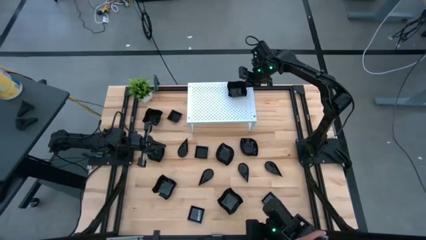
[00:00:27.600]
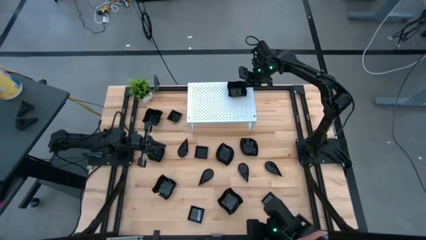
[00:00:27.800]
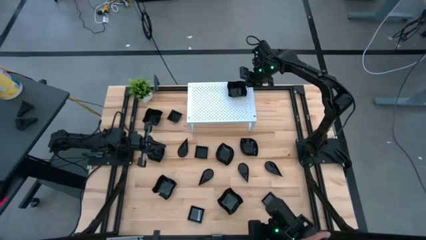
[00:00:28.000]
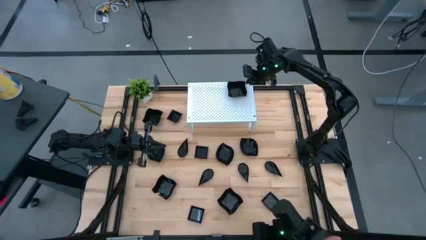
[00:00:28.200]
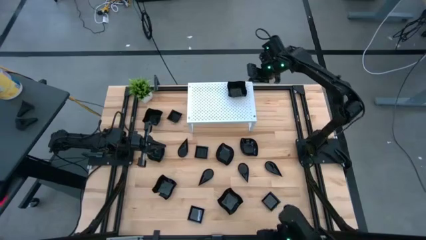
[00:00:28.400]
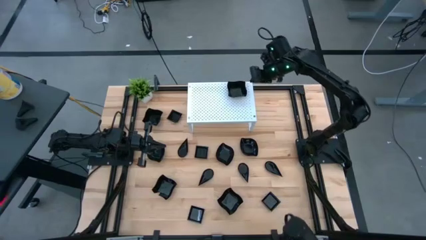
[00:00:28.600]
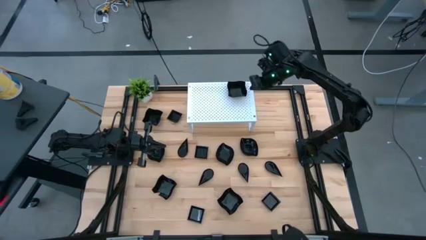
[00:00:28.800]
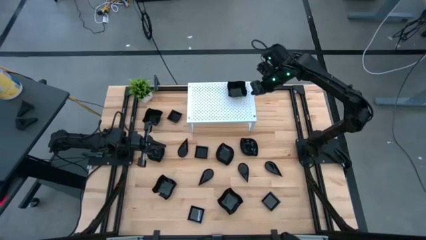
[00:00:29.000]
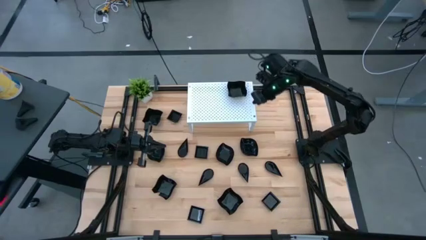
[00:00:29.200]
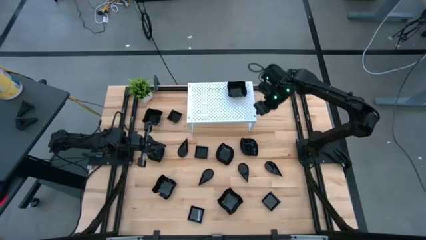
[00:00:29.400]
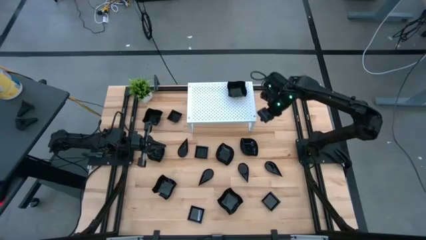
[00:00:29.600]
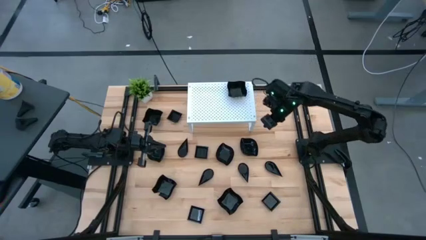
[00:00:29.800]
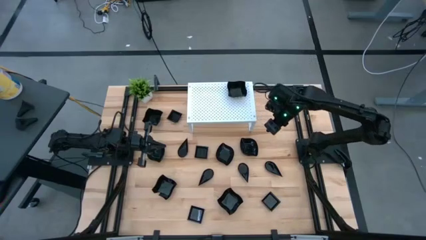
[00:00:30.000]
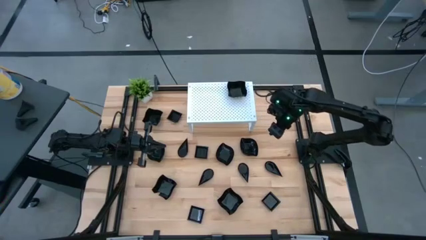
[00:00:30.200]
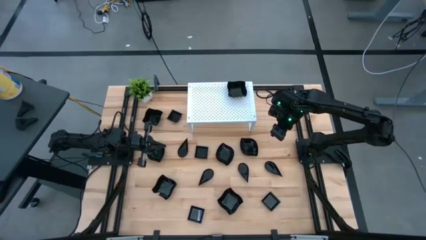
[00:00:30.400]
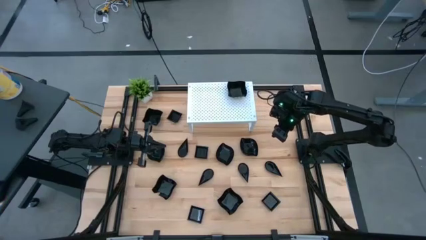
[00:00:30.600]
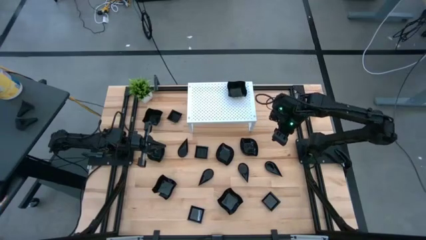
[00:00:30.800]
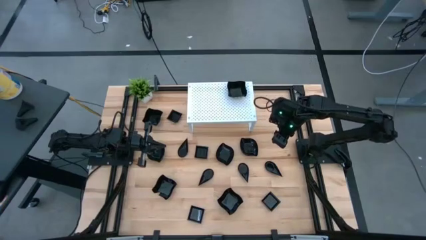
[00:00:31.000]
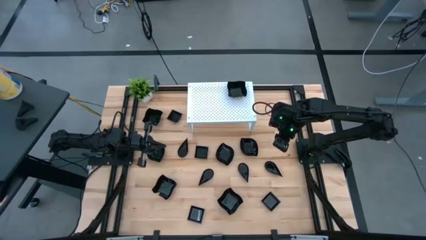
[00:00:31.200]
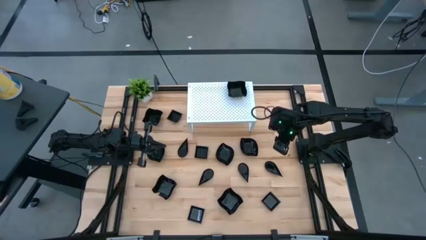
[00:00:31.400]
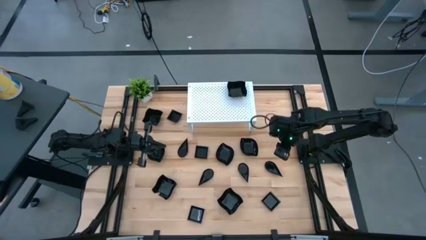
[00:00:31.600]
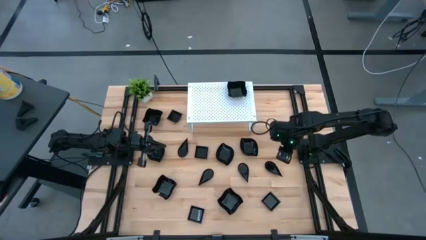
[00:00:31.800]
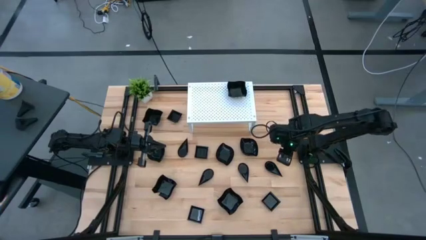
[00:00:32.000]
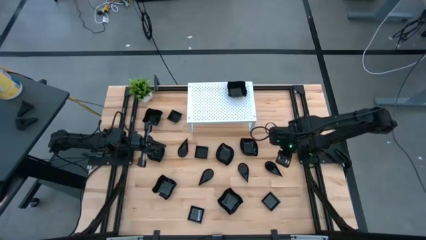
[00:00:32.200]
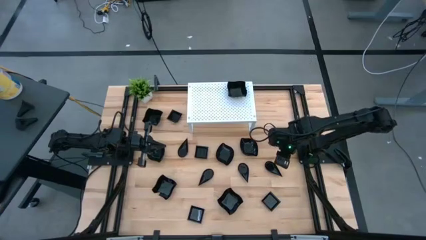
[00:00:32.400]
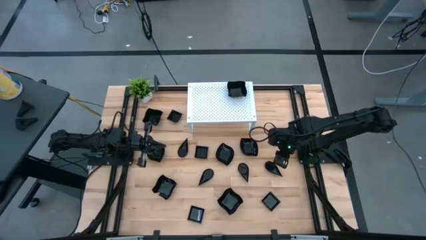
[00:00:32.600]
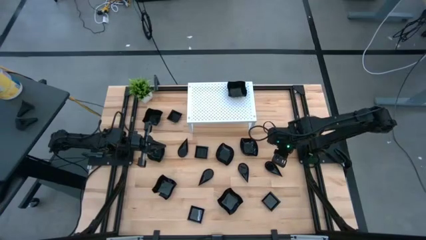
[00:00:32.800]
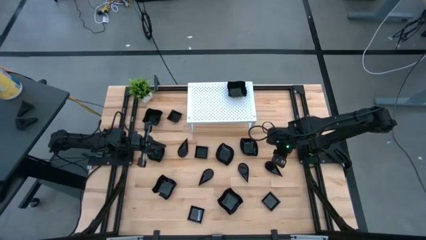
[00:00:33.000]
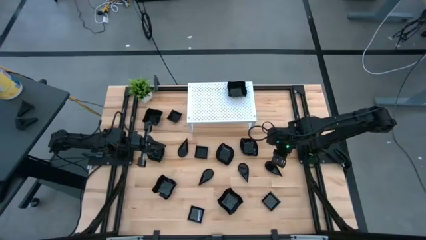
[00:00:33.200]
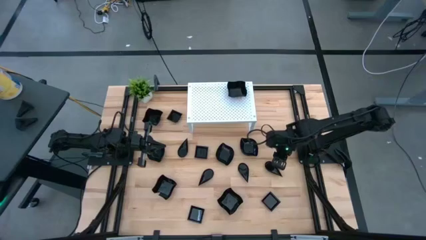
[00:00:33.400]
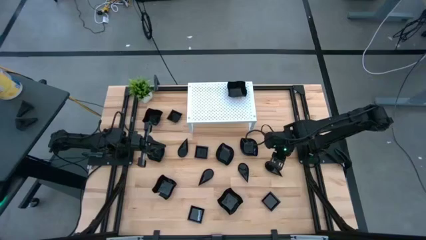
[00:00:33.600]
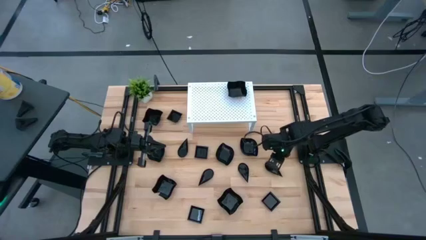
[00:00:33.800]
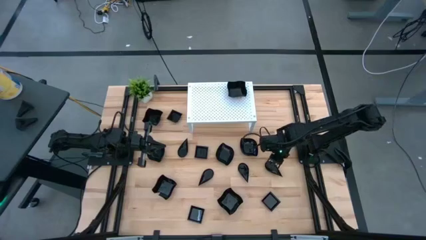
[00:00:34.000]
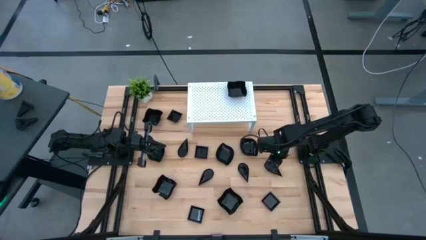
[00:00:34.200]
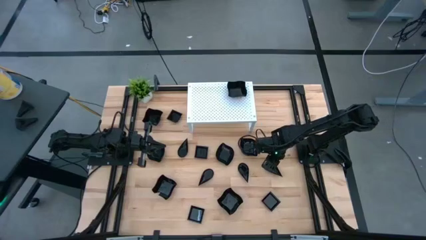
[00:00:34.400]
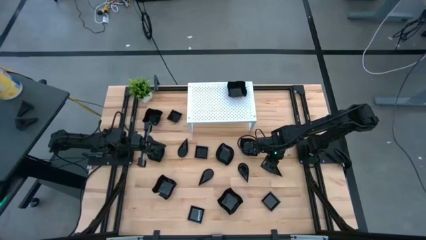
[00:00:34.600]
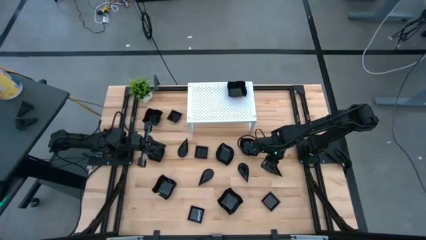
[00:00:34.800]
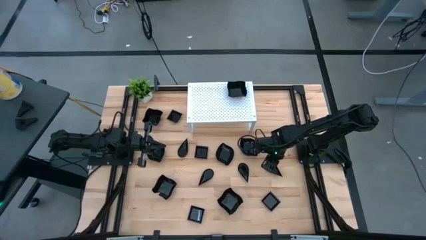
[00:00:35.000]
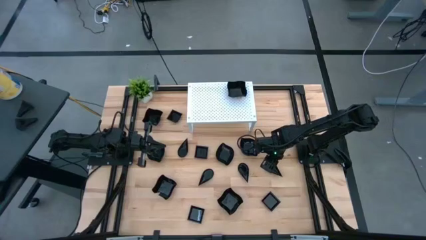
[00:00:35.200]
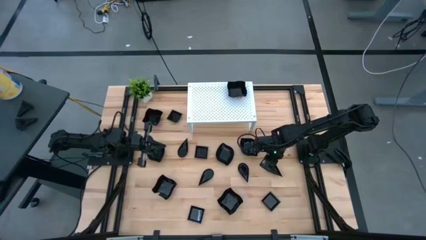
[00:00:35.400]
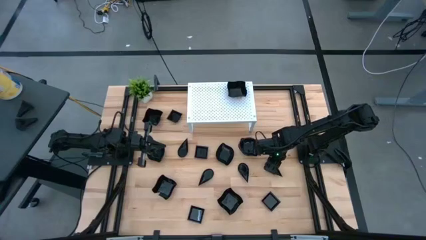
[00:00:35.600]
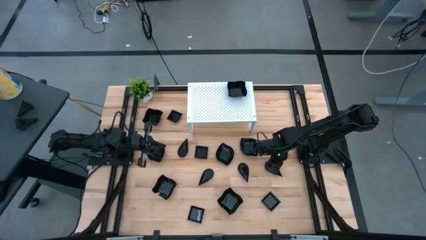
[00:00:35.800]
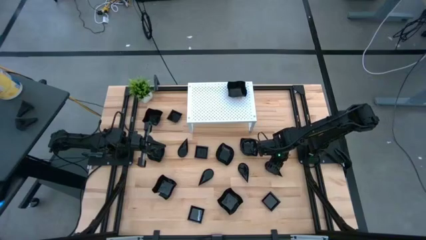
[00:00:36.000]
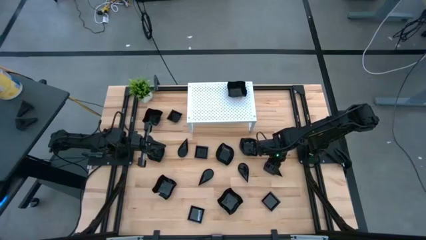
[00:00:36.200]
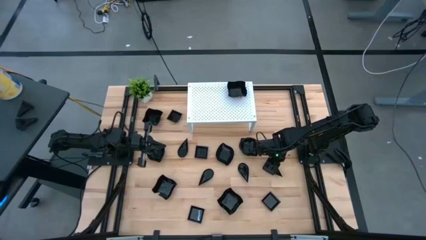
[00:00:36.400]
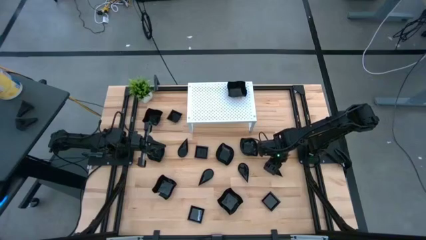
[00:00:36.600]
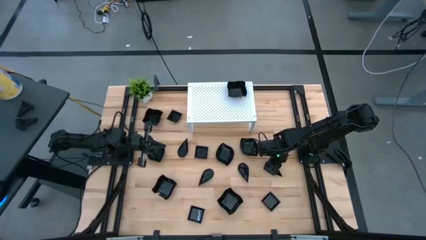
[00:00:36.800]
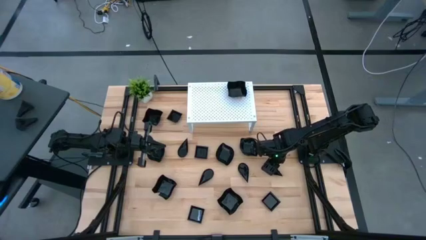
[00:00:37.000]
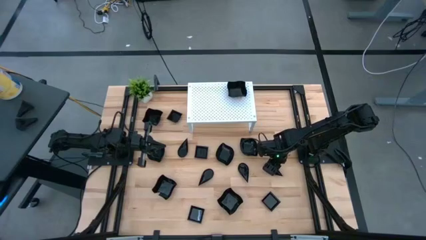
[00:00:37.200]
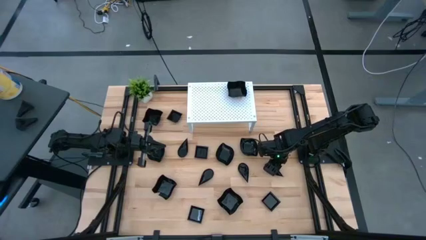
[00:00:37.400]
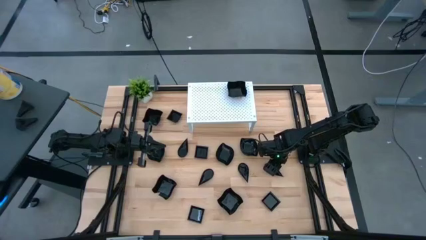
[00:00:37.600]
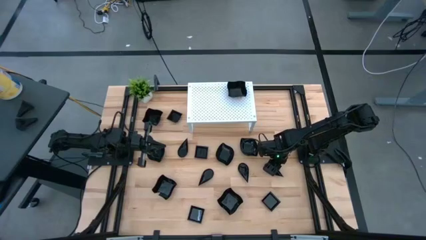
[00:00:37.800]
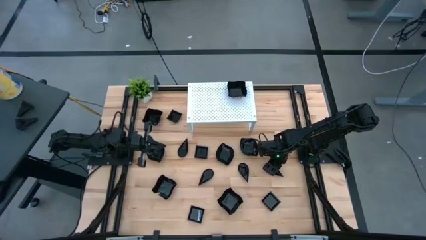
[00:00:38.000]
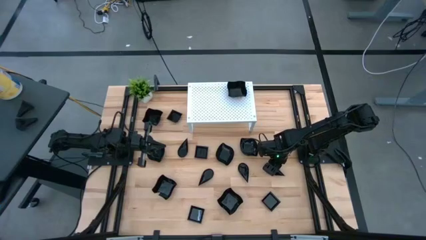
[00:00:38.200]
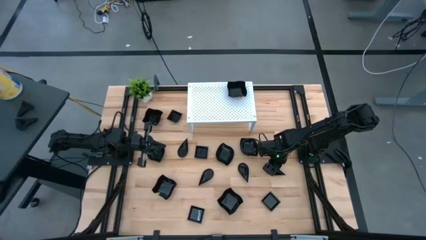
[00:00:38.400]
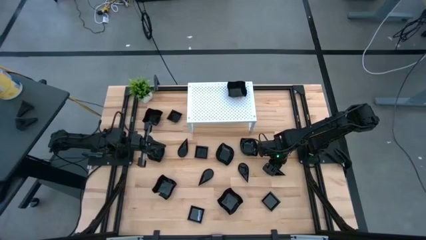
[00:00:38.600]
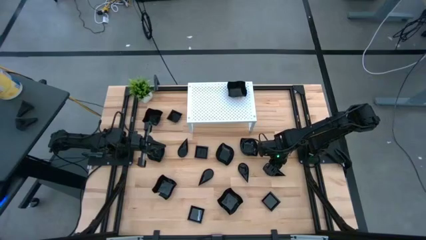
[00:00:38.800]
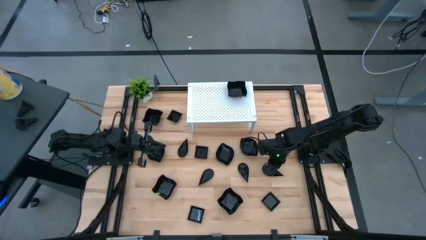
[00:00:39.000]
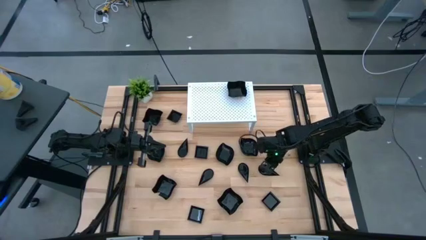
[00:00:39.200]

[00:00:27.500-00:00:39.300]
Task: Pick & Place Mini shaped plates
Put the drop-shaped plate on the shelf
